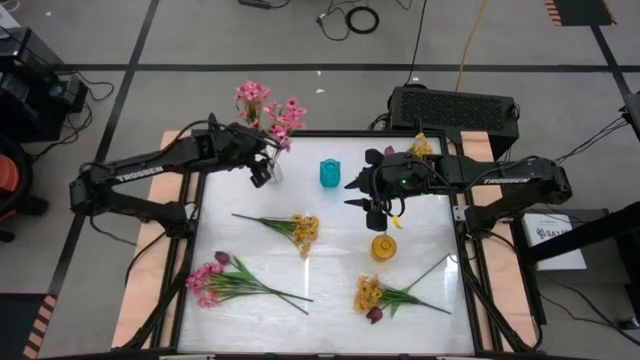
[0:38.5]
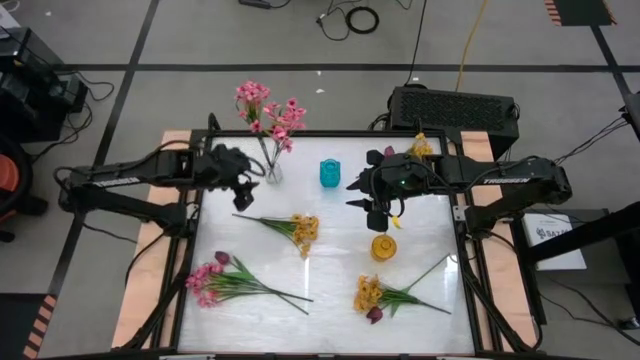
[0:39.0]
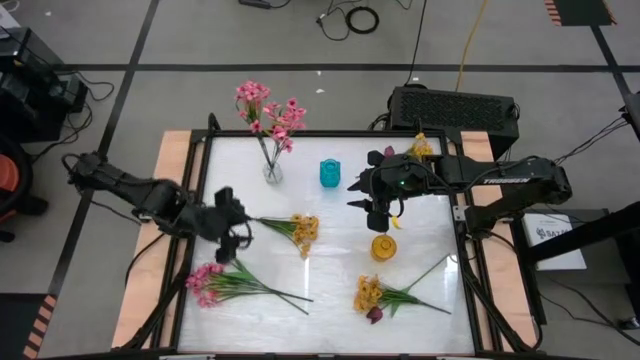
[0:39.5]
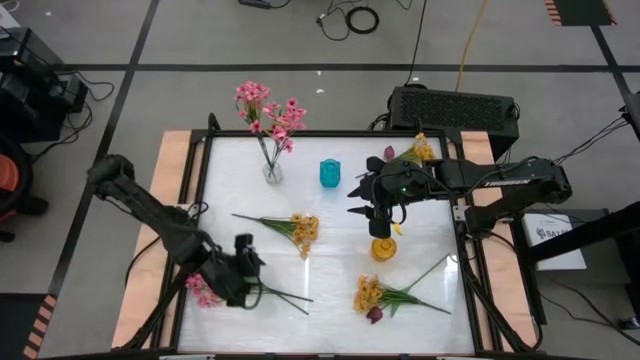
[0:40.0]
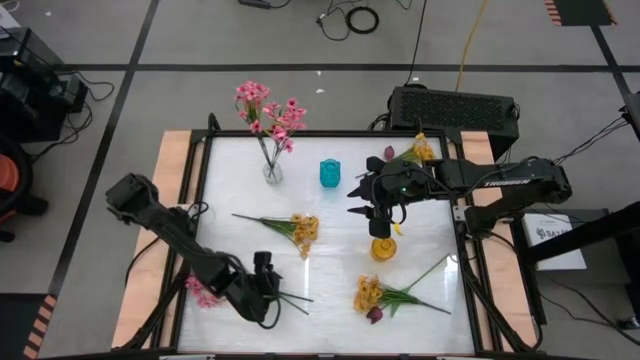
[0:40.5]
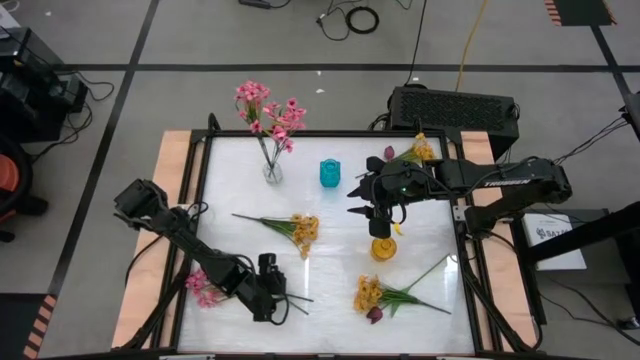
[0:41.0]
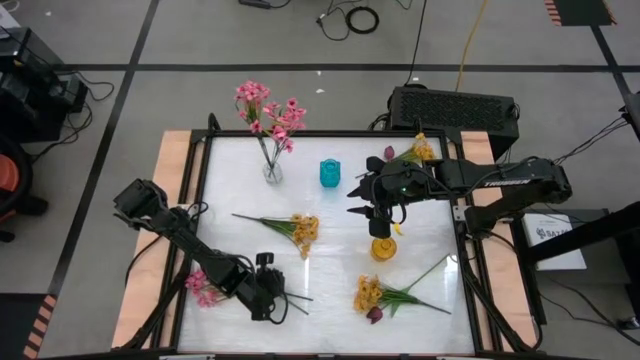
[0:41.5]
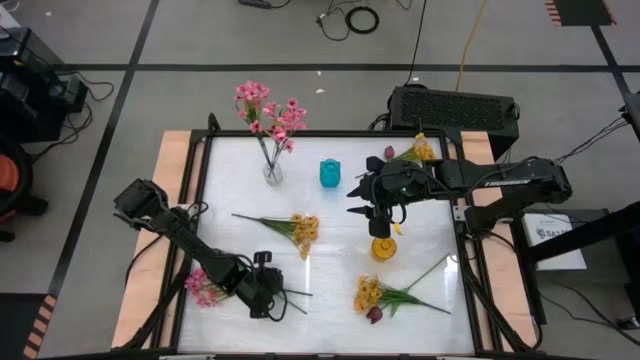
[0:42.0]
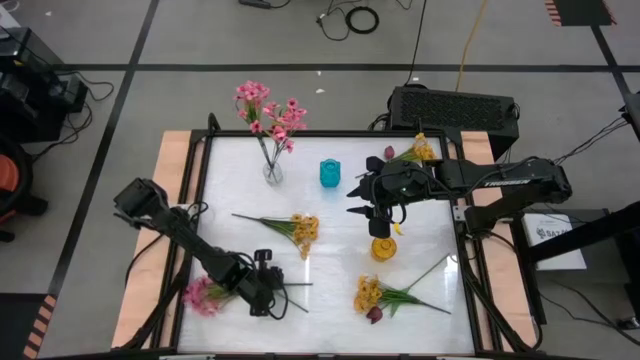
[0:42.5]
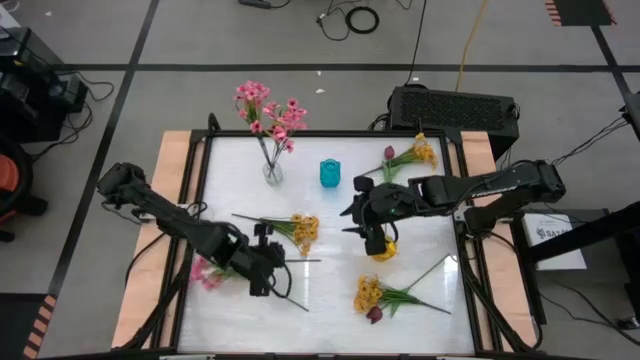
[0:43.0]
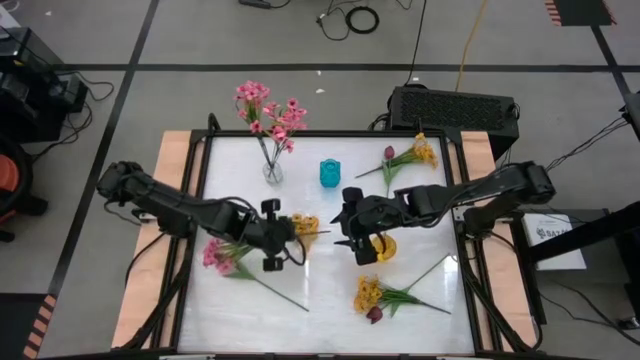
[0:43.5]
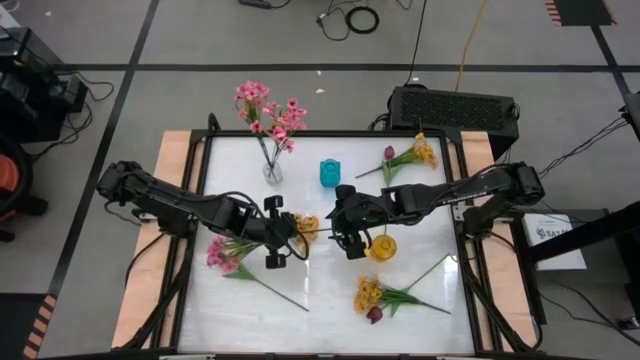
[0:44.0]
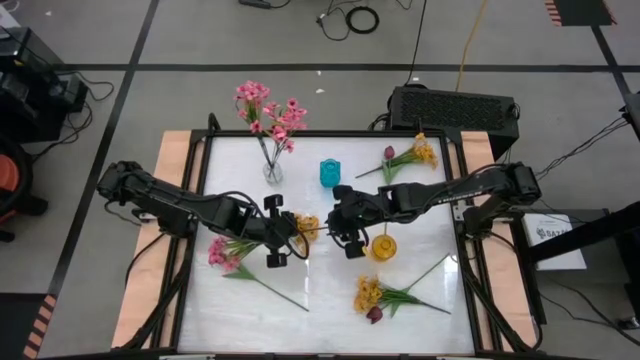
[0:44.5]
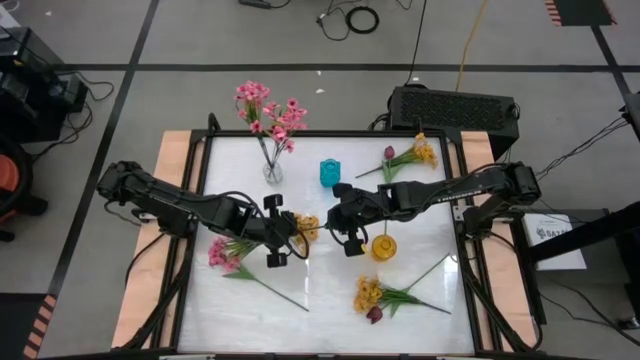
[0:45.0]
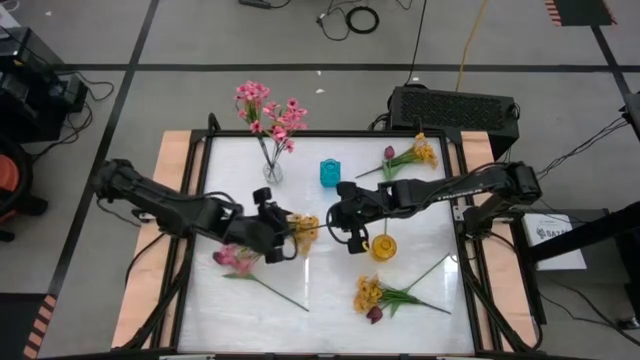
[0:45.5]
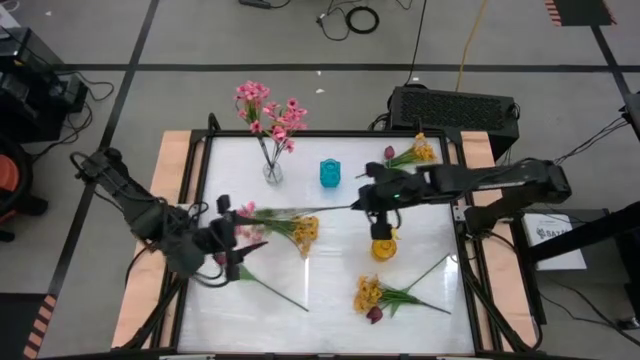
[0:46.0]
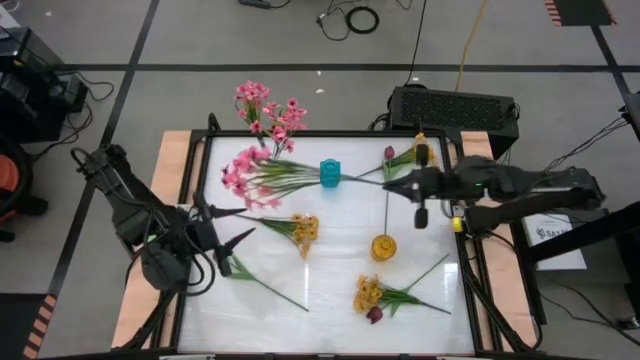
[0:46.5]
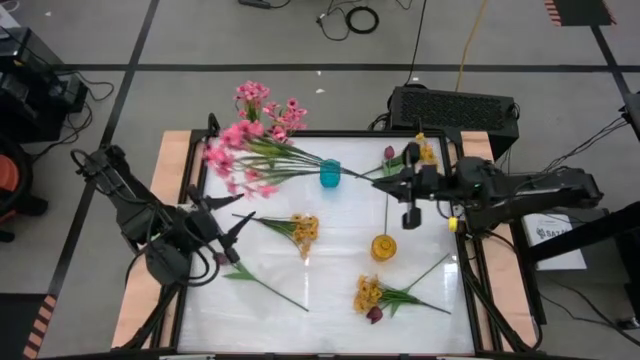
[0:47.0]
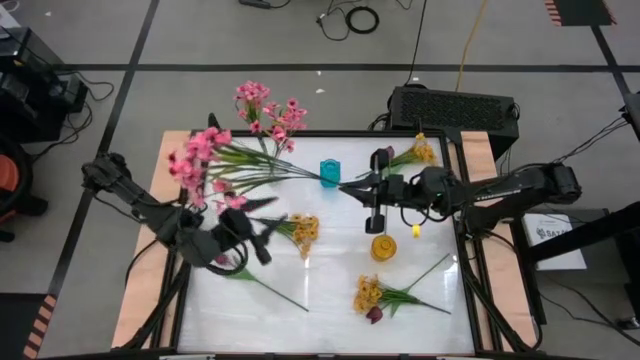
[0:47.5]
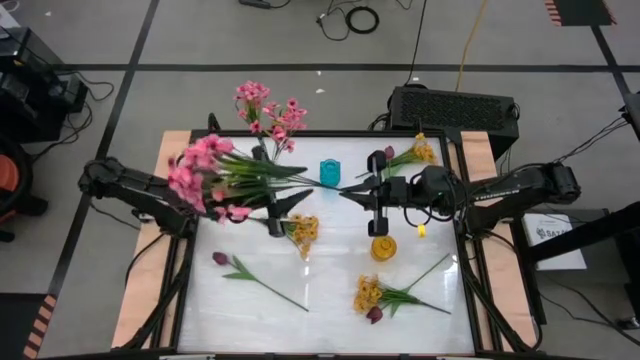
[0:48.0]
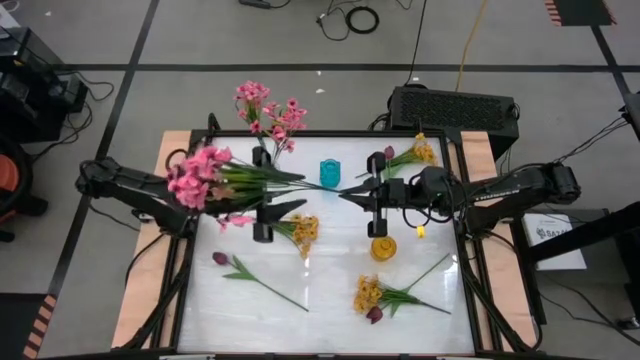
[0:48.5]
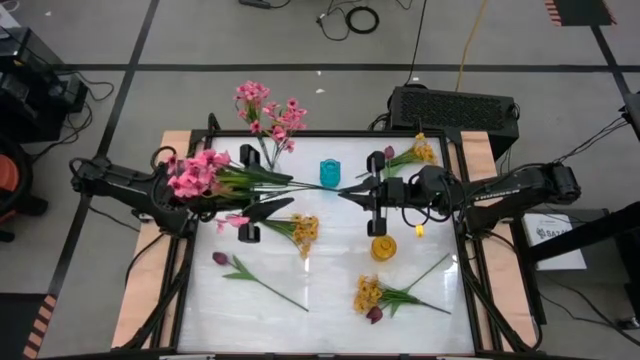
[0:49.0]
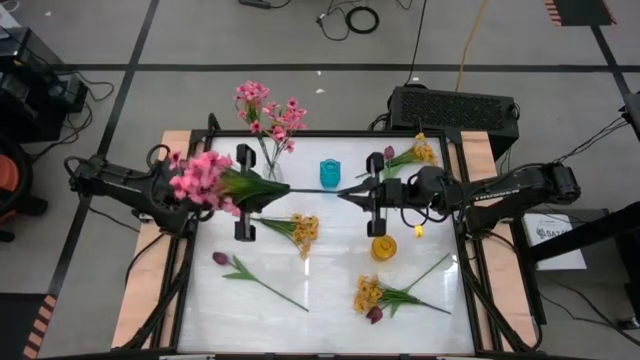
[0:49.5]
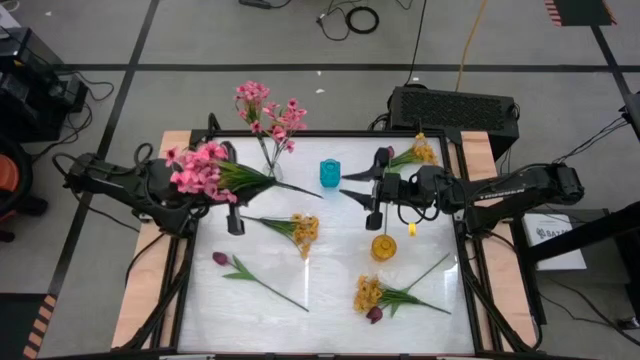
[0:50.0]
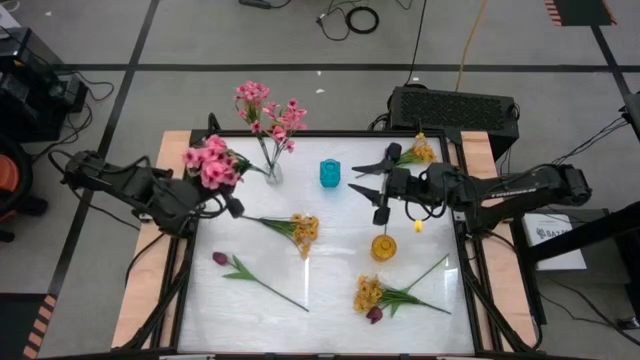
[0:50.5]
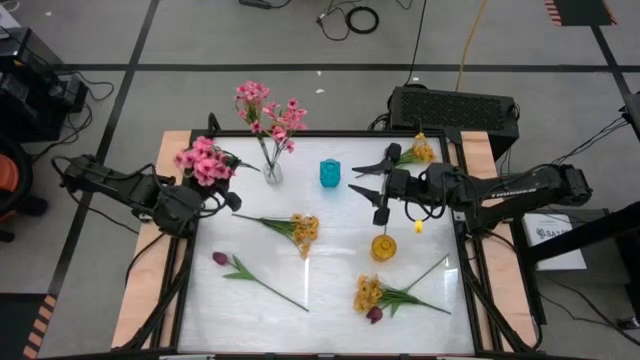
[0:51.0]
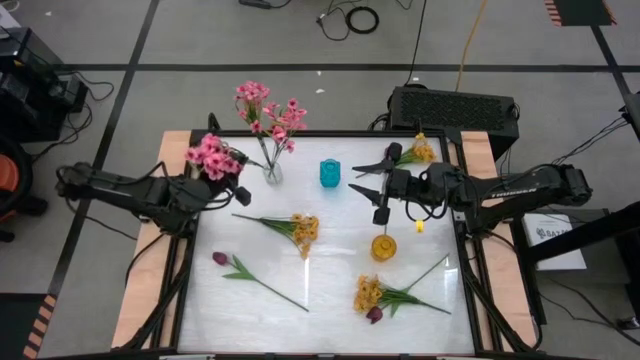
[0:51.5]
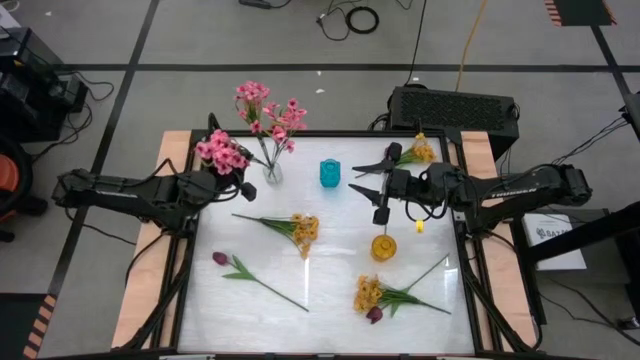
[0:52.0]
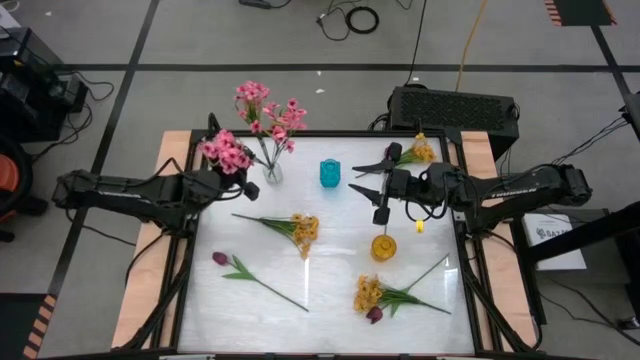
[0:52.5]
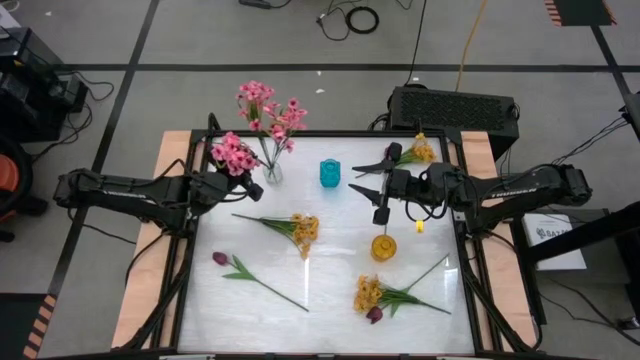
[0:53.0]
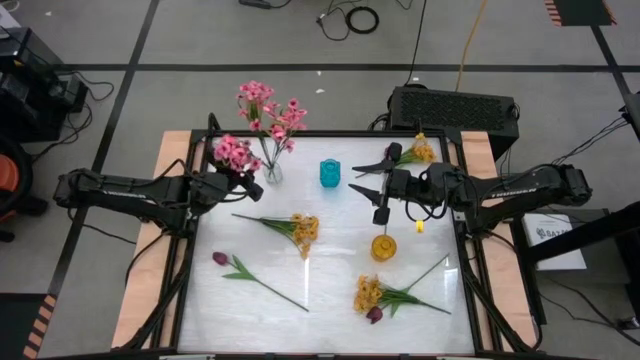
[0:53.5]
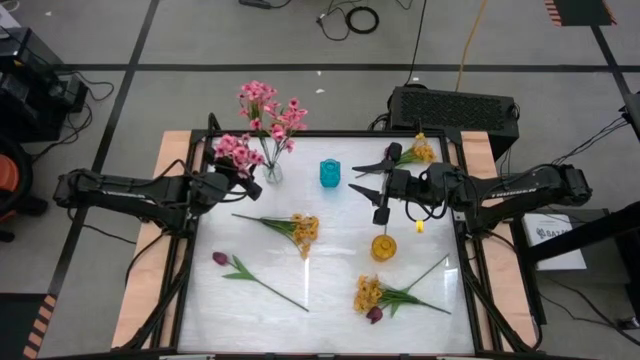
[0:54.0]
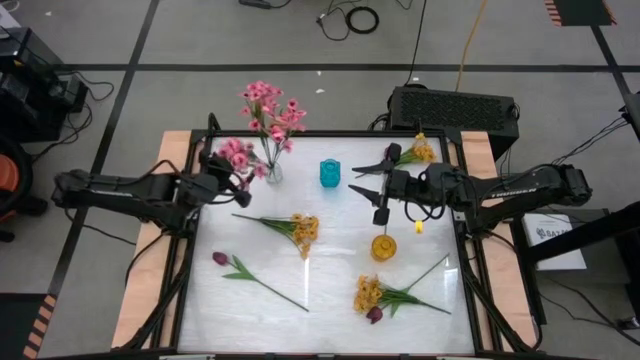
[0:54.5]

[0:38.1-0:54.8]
Task: Sort flowers into vase by color
Put the pink flowers into the transparent vase

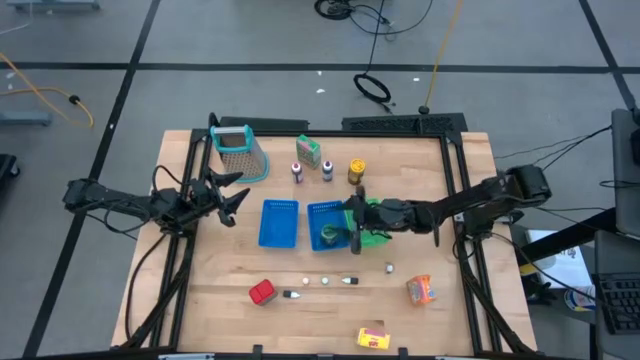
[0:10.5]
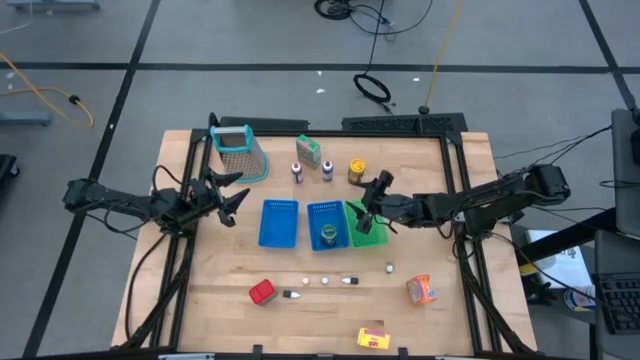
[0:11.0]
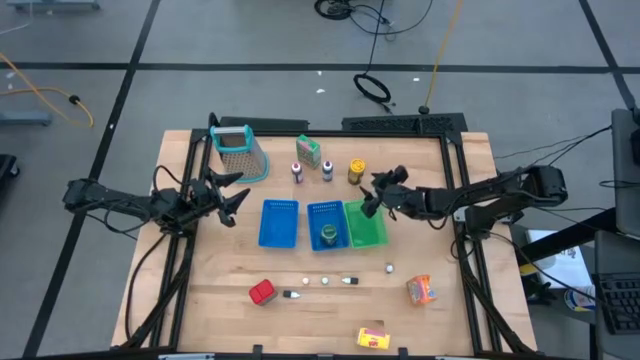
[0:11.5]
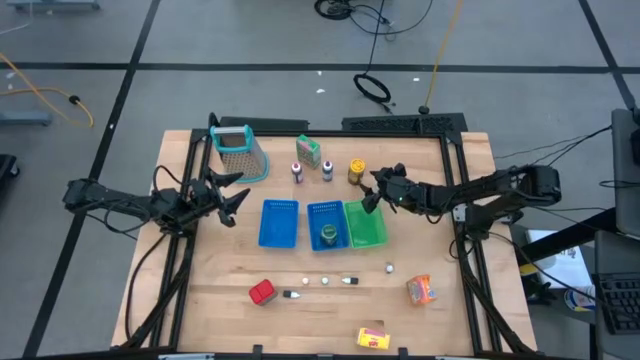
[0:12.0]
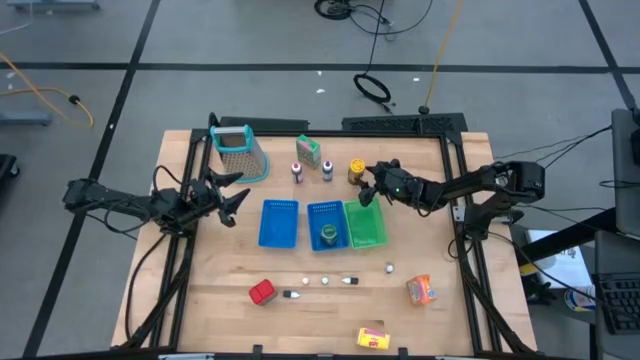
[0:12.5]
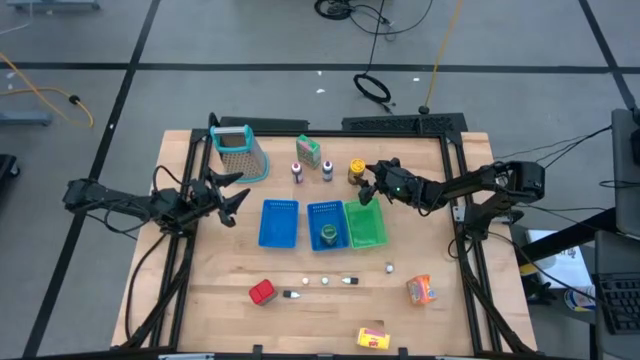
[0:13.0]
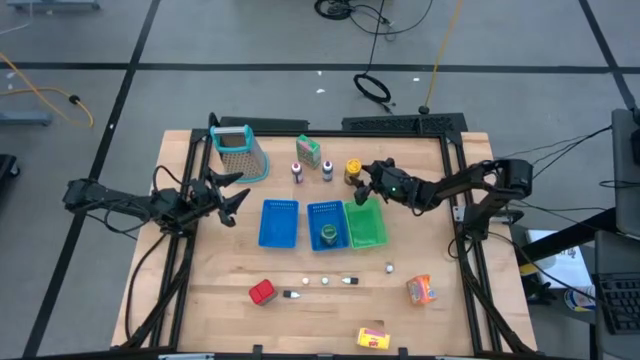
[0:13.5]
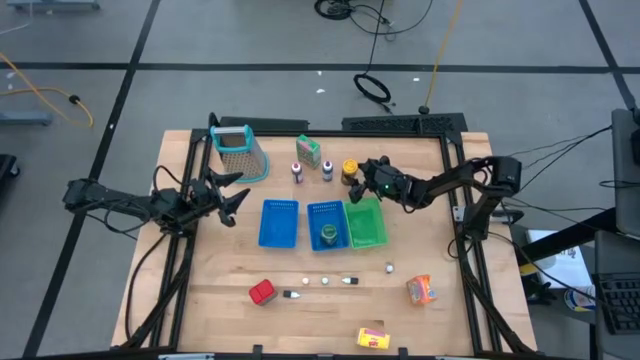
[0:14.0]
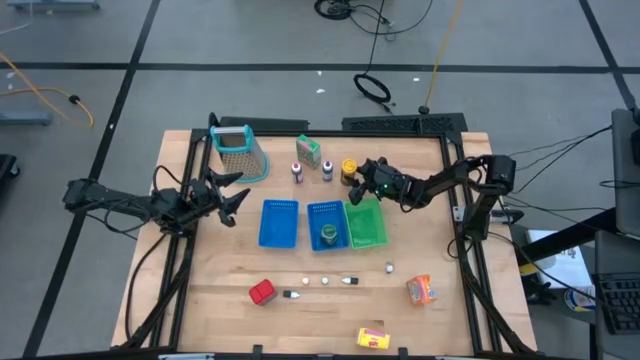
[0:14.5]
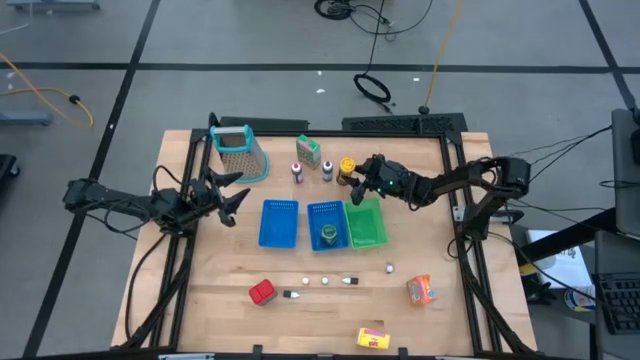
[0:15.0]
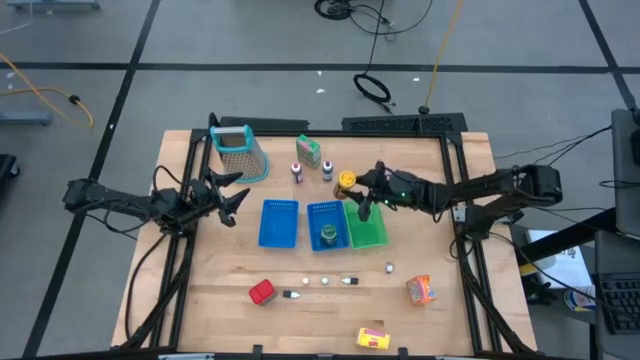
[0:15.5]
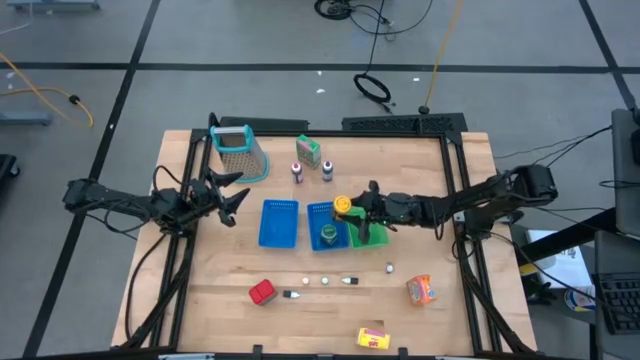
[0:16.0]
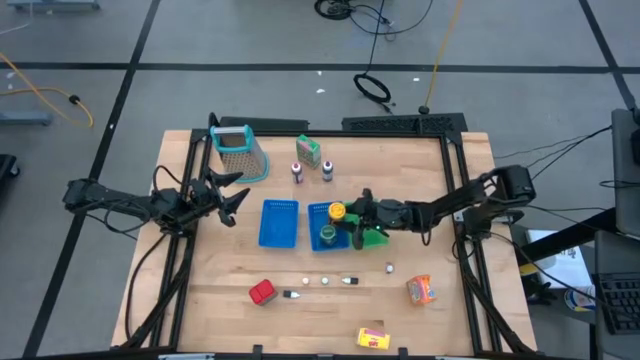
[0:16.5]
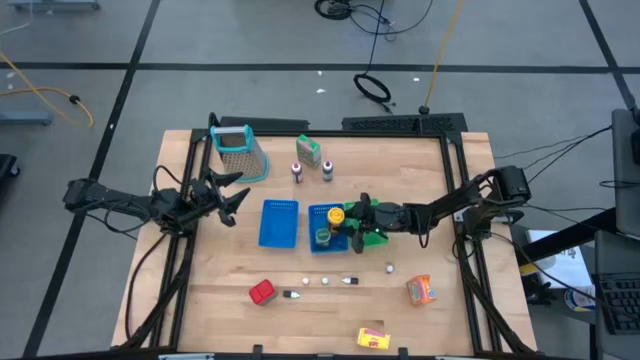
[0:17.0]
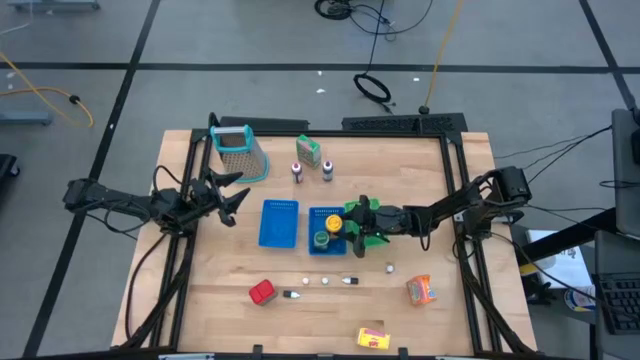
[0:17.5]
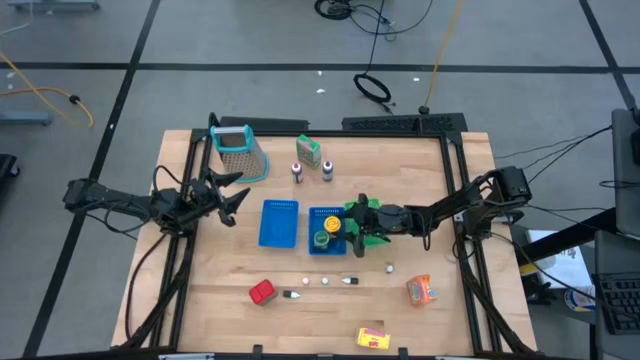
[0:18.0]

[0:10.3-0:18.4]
Task: Pick & Place Kitchen Items
Put the yellow spice bottle into the right blue bin
